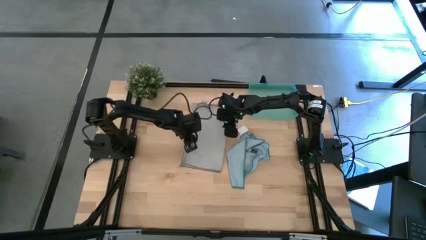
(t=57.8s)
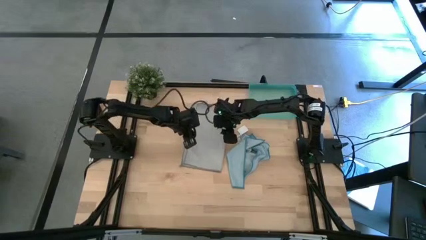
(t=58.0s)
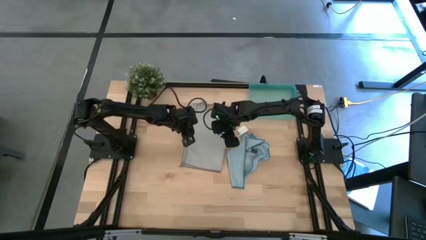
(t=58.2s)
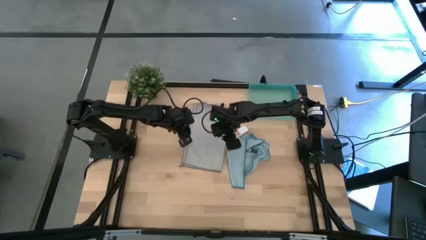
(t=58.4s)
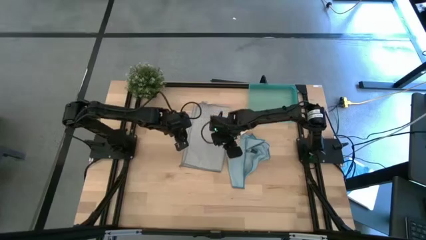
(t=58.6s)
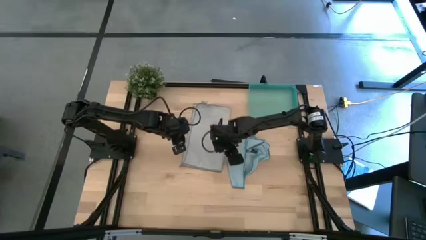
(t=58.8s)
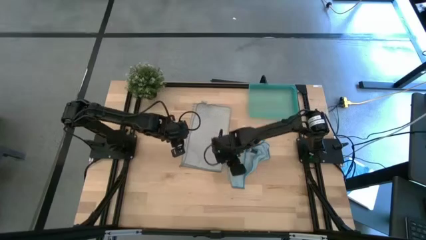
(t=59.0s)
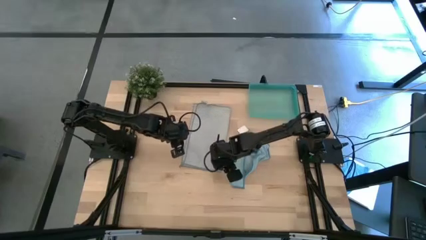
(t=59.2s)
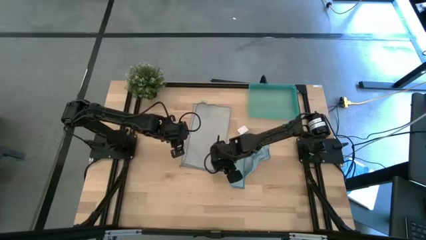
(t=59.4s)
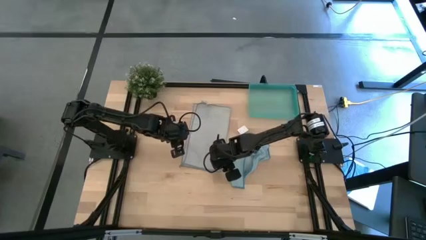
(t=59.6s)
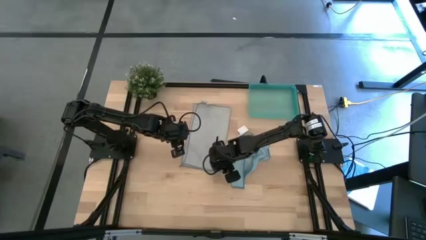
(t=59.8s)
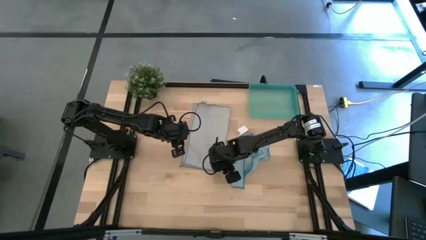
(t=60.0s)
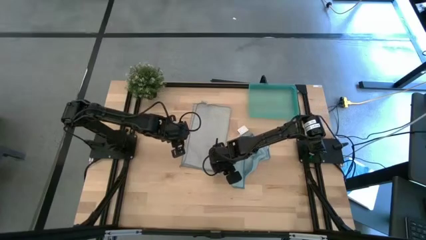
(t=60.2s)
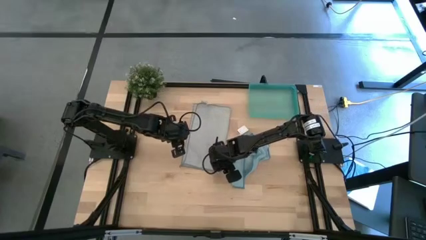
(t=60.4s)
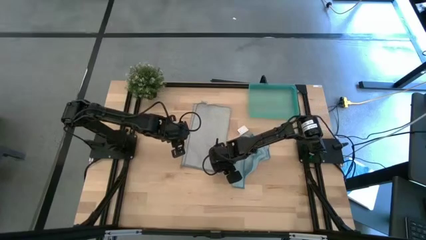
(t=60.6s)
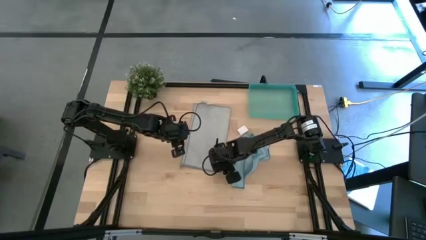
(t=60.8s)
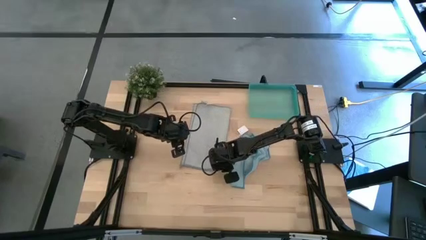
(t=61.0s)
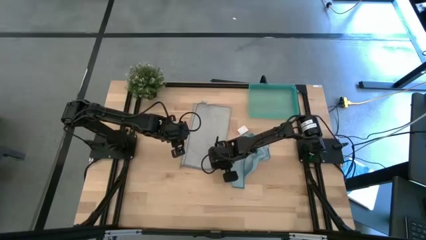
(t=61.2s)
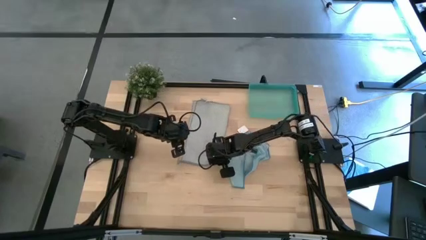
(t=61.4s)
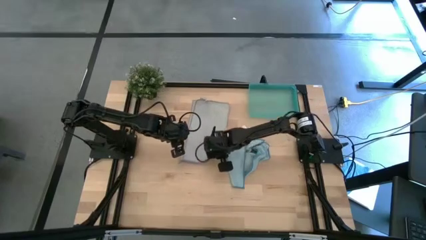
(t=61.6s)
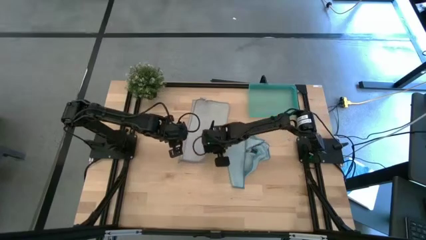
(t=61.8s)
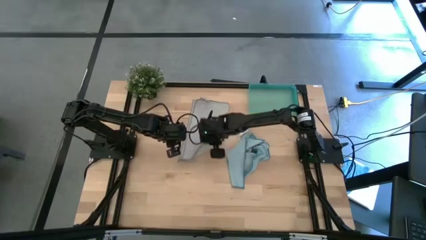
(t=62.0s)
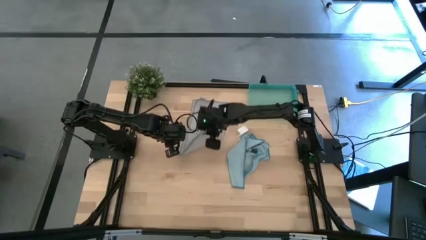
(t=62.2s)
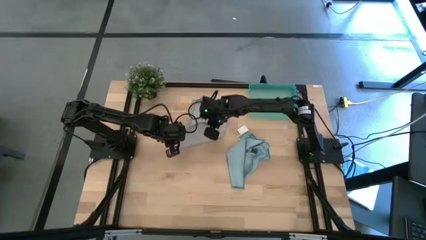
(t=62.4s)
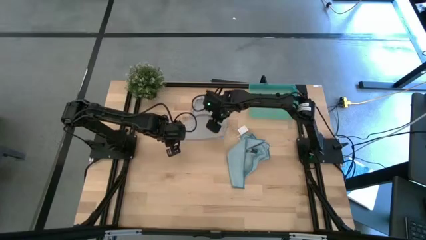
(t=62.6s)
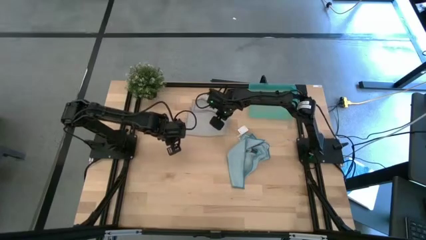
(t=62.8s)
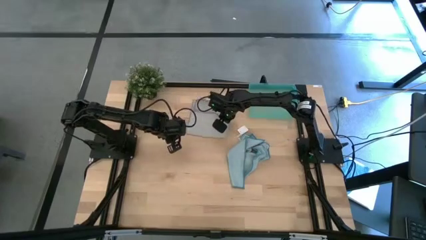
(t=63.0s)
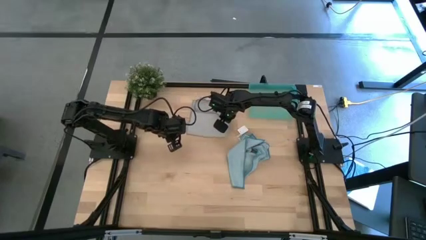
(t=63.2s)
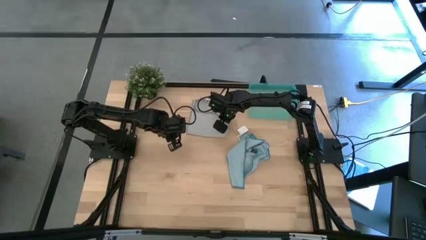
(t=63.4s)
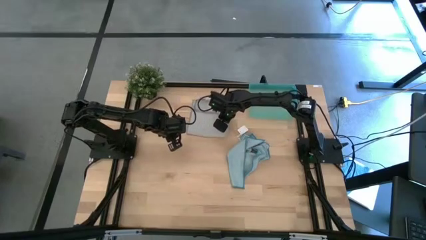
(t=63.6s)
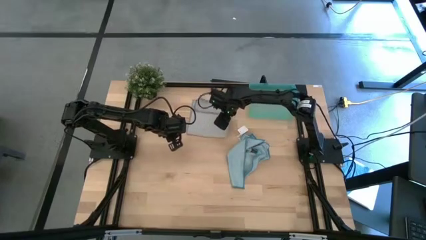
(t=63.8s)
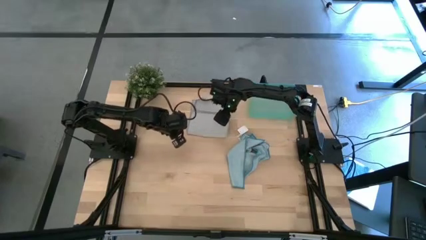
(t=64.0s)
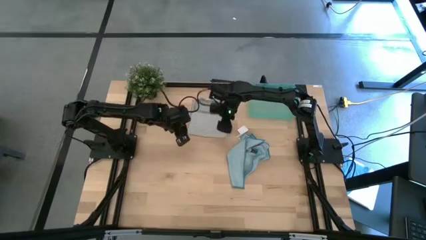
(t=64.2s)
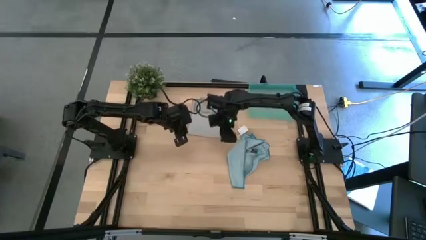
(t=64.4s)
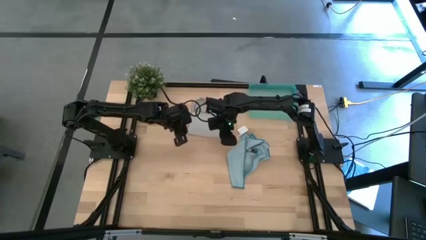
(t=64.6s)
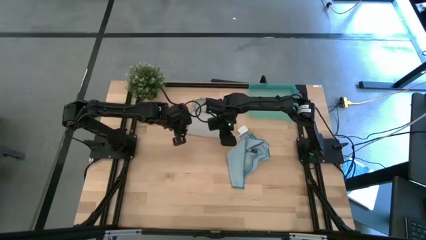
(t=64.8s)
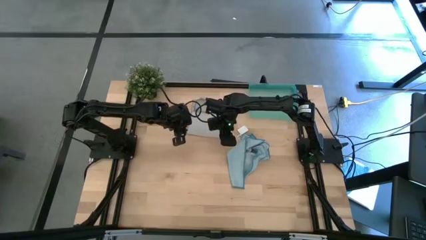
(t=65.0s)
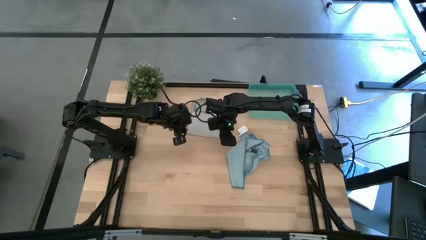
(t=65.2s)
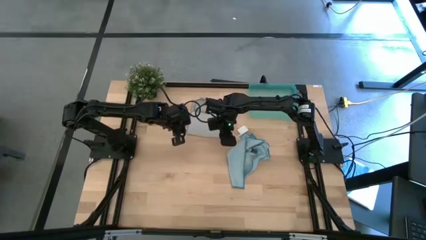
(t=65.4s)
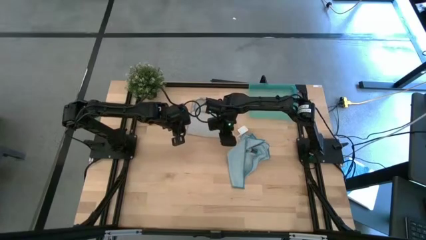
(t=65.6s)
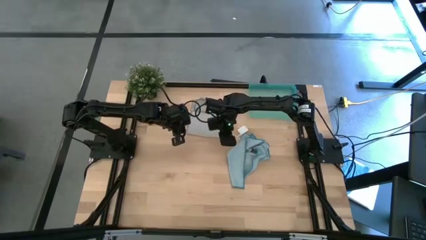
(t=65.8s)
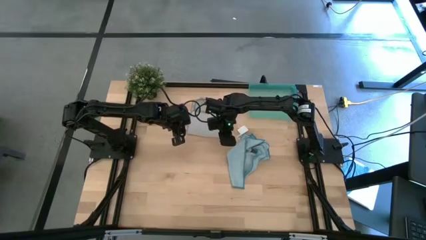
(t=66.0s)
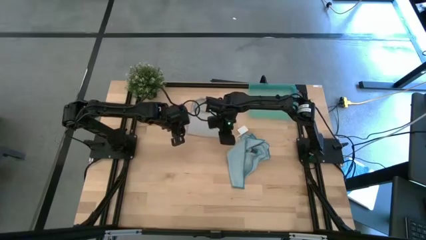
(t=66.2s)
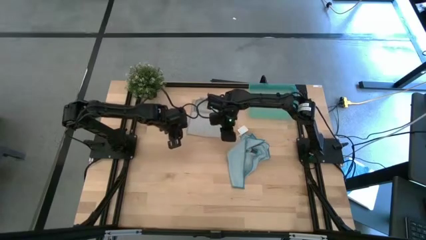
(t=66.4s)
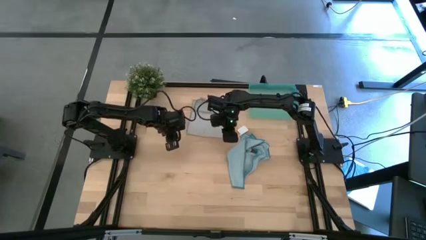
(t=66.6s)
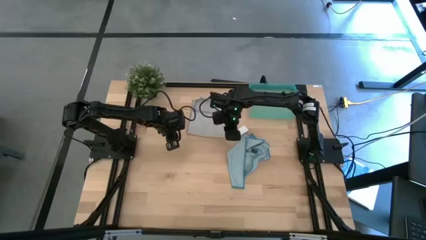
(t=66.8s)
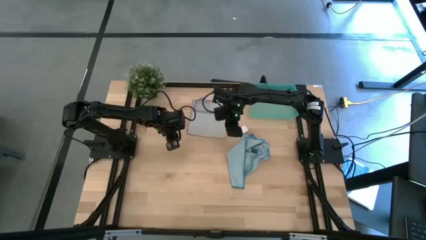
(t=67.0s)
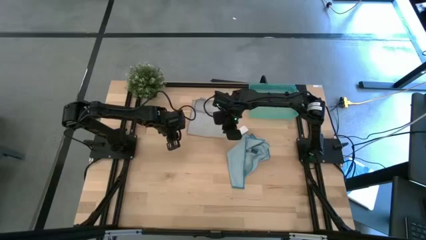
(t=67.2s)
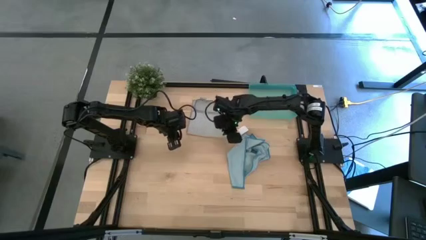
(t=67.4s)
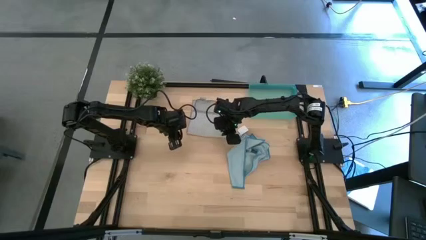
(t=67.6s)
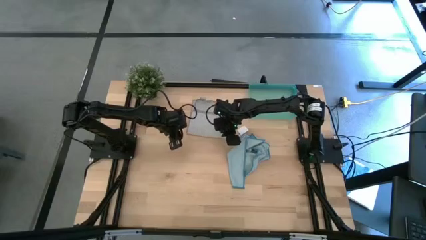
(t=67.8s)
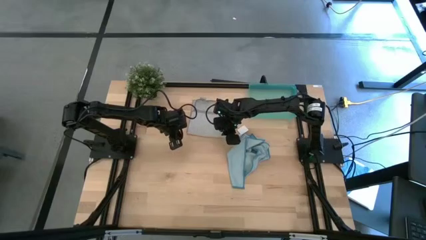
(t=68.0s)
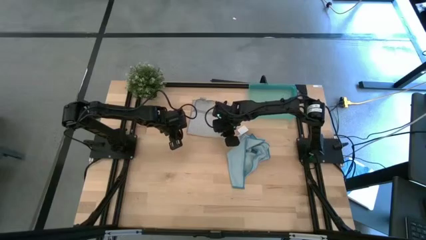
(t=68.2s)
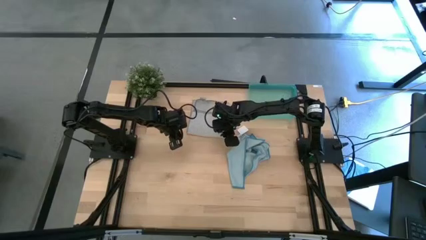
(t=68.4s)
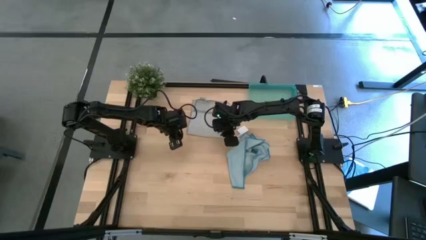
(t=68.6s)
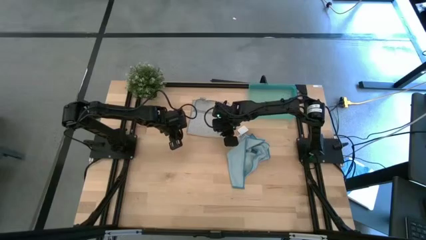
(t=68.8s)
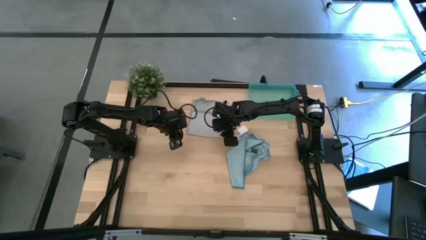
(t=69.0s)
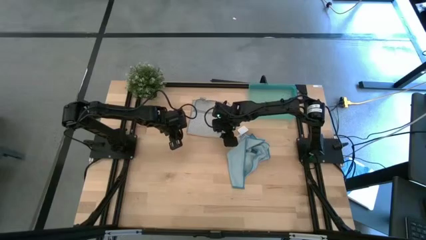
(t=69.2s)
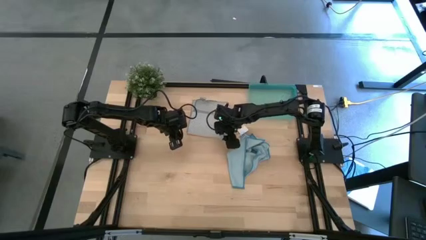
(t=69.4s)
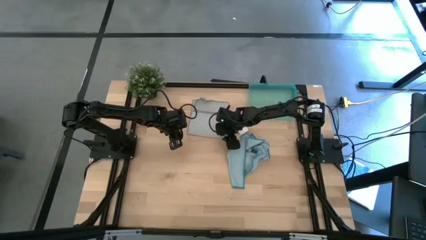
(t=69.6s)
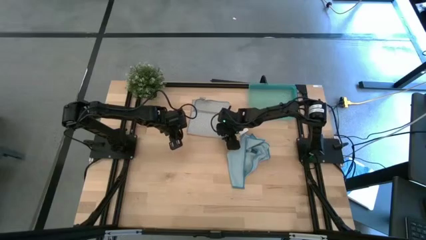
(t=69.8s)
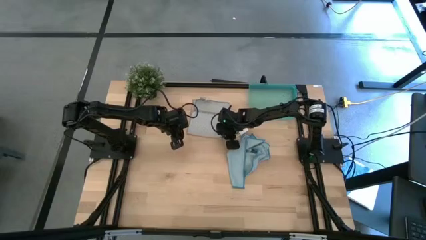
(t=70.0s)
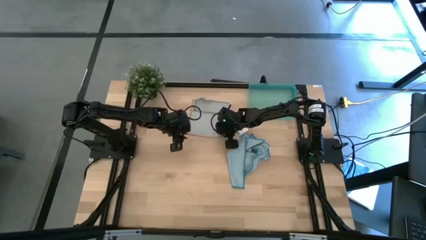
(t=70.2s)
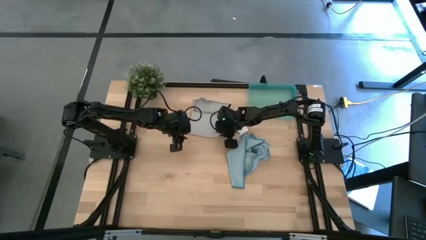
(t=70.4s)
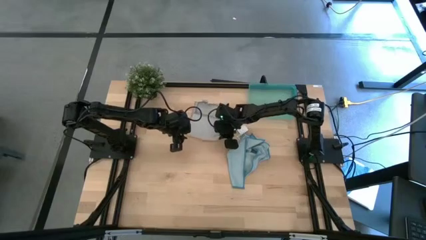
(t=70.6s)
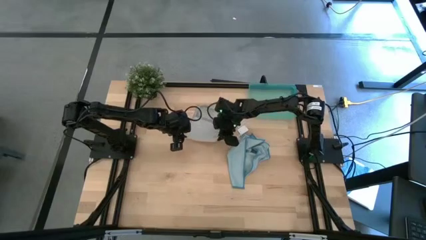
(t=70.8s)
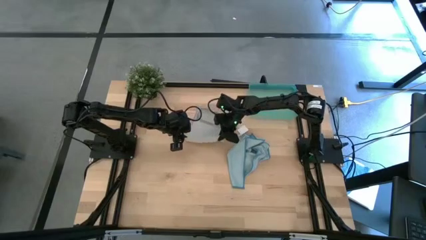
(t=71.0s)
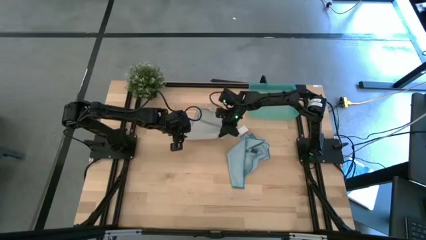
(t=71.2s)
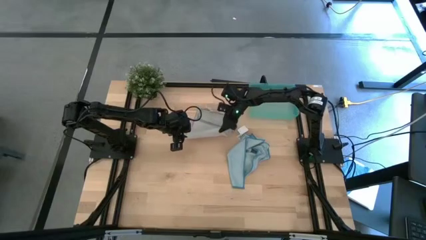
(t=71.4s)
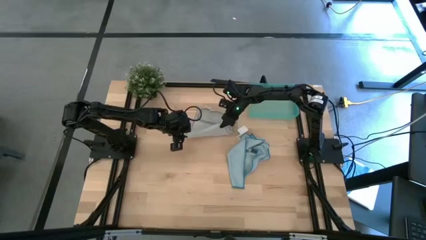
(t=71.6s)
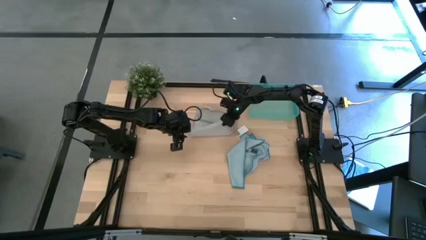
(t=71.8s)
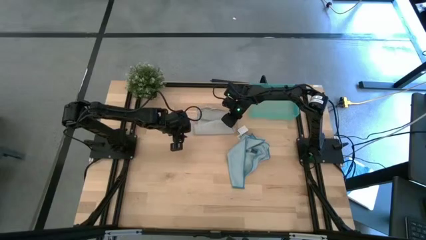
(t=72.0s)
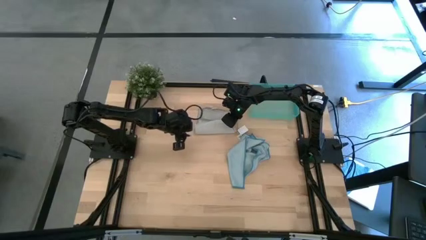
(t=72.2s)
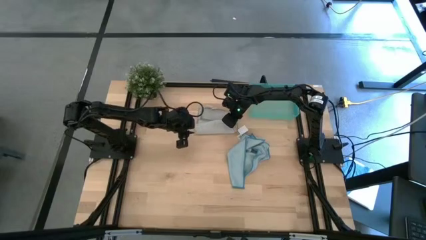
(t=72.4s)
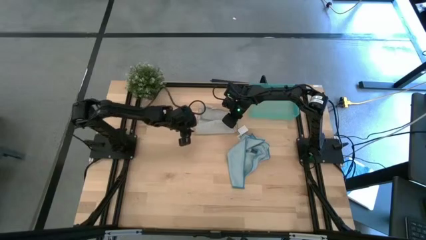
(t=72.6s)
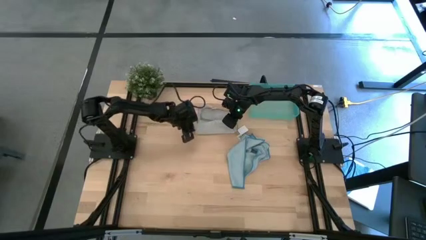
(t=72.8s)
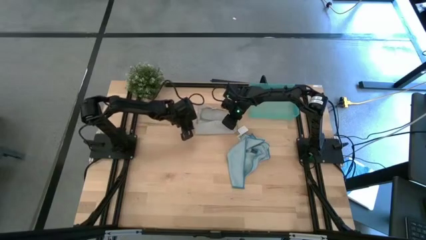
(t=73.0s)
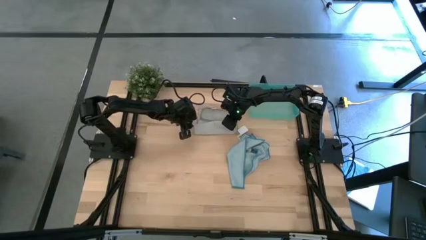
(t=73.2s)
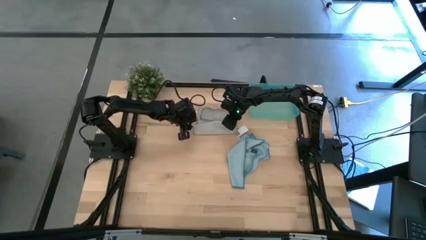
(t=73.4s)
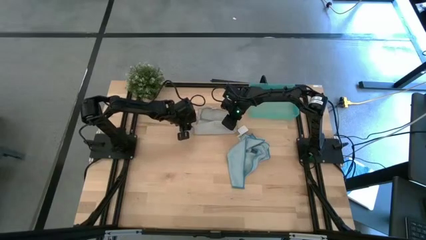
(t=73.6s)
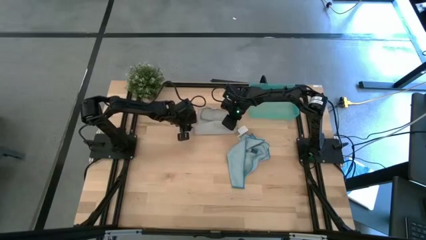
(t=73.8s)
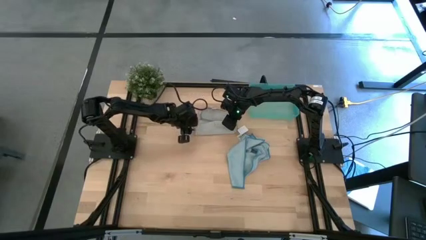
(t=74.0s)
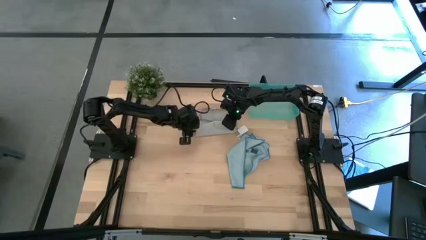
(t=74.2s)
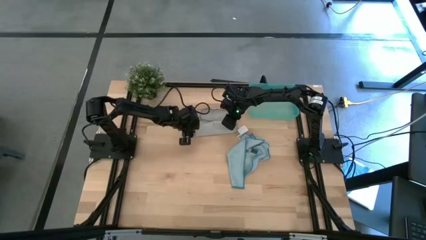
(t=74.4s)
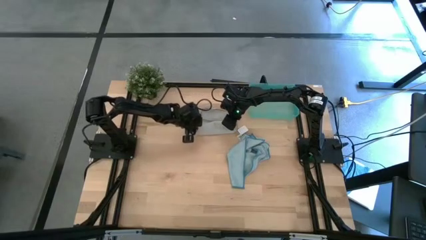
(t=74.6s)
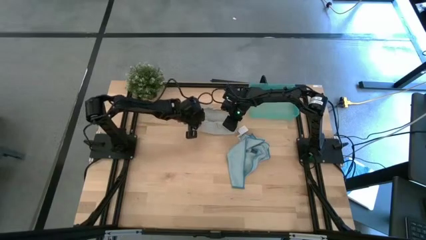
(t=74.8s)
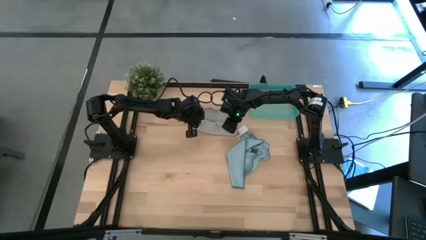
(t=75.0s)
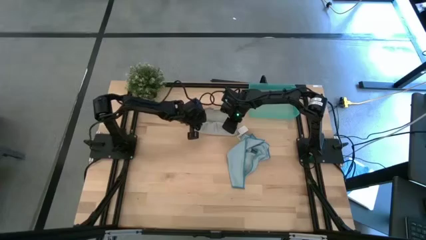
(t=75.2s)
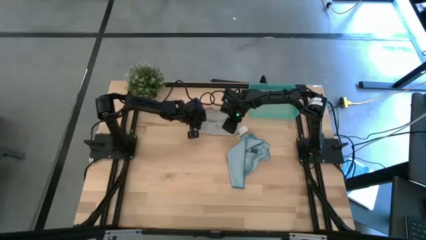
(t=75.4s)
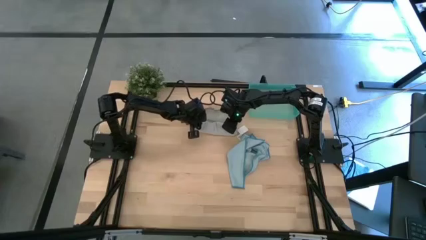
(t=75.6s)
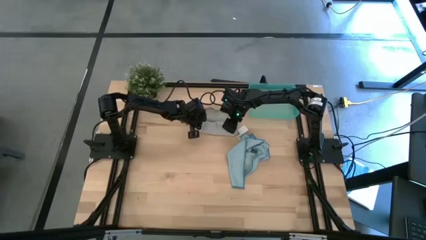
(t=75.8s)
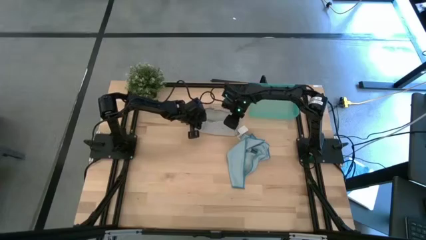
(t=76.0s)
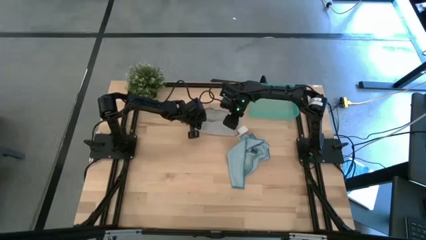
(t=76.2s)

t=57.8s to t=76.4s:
Task: Roll microfiber towels into tight, uniform cylinder then place into a basket
Roll the grey microfiber towel
